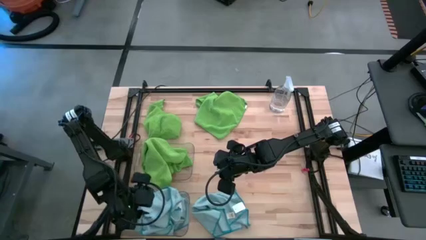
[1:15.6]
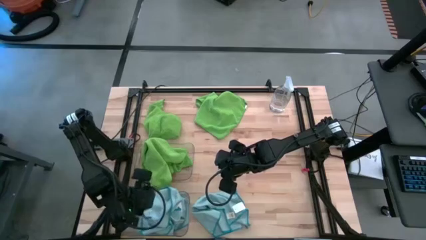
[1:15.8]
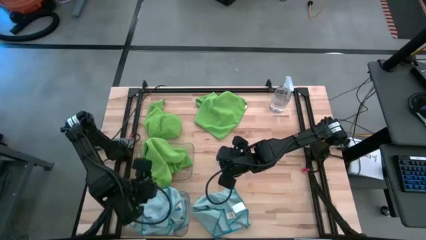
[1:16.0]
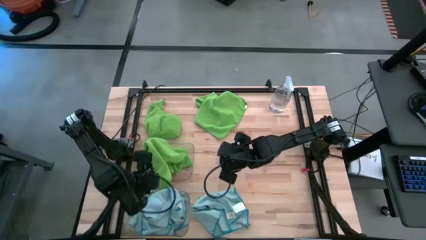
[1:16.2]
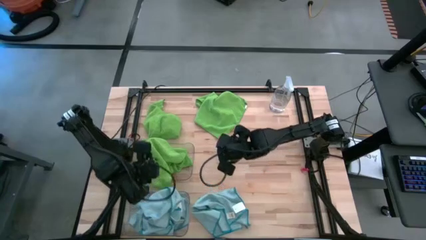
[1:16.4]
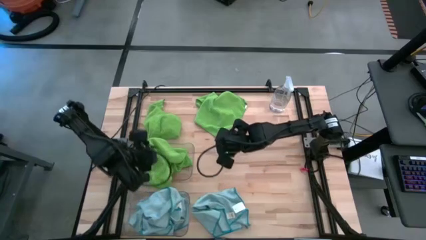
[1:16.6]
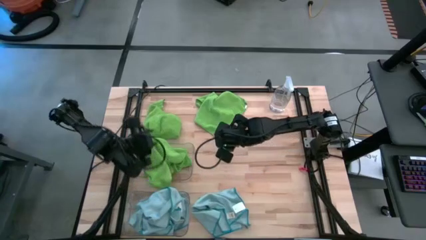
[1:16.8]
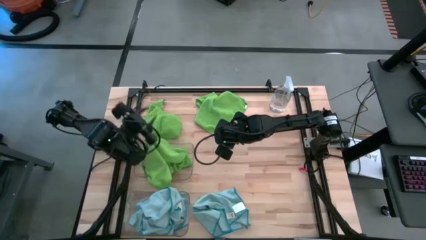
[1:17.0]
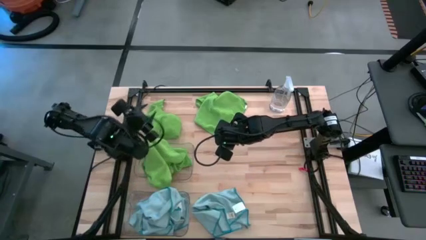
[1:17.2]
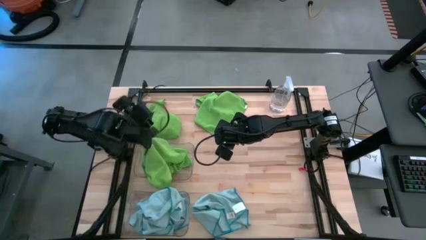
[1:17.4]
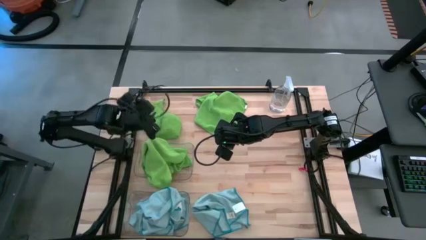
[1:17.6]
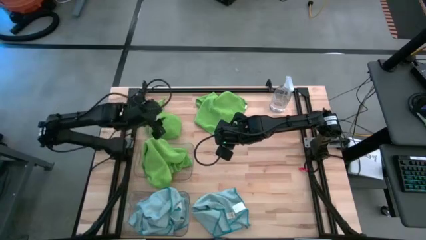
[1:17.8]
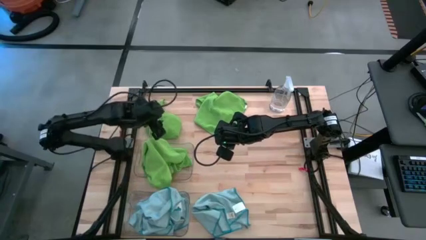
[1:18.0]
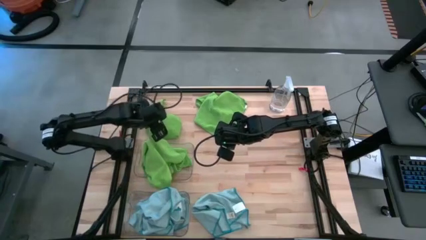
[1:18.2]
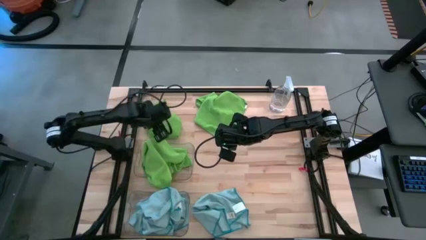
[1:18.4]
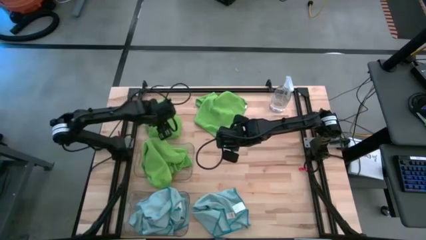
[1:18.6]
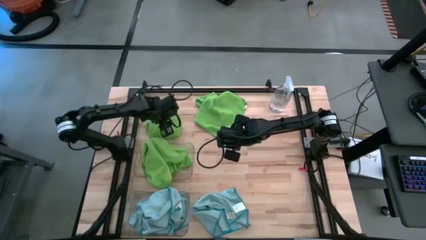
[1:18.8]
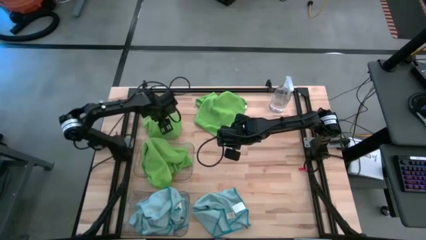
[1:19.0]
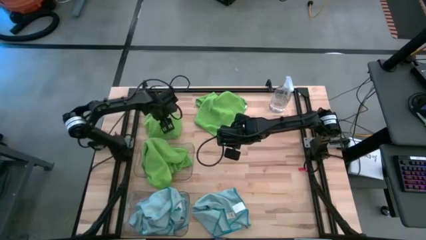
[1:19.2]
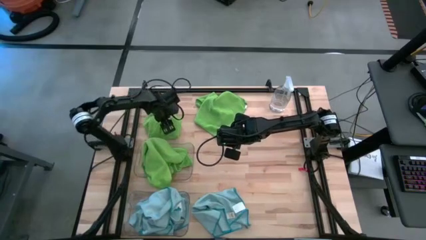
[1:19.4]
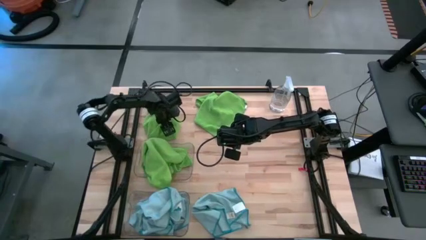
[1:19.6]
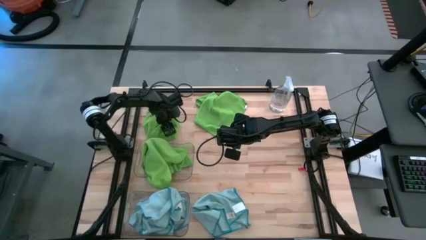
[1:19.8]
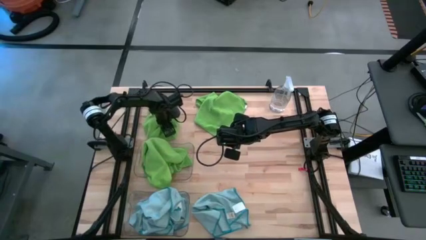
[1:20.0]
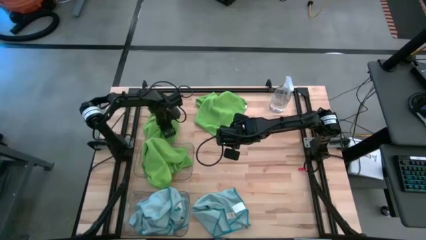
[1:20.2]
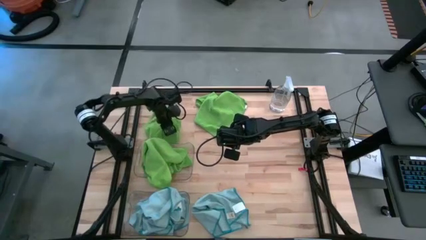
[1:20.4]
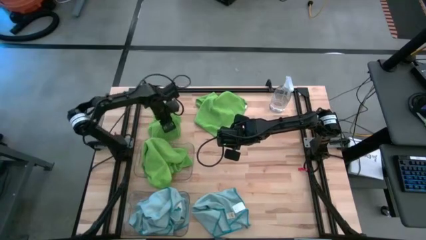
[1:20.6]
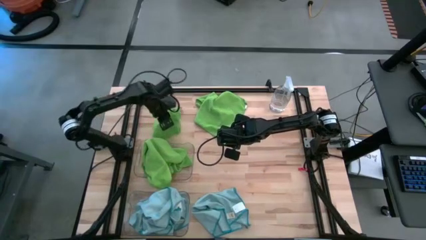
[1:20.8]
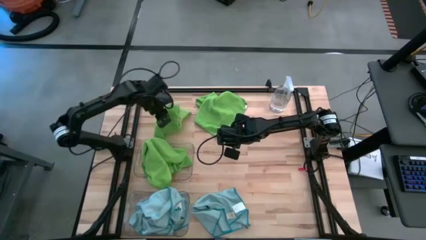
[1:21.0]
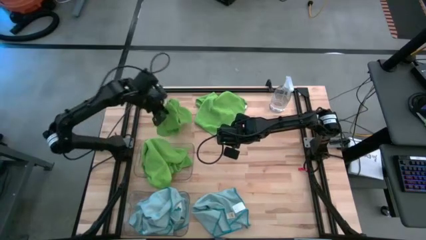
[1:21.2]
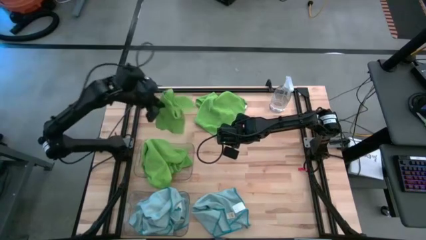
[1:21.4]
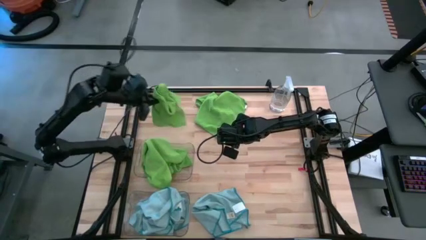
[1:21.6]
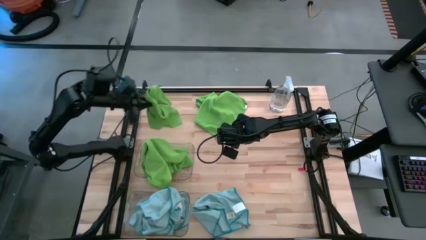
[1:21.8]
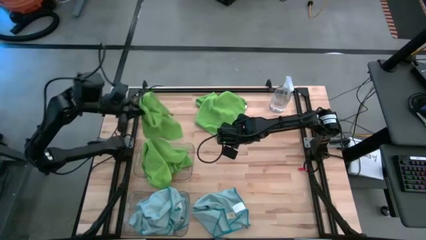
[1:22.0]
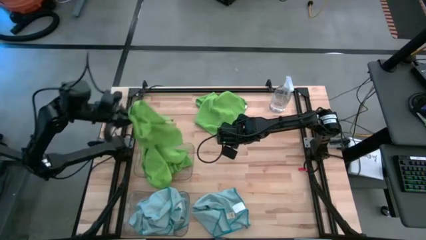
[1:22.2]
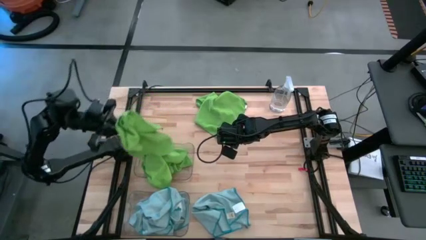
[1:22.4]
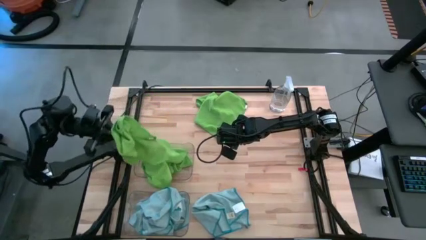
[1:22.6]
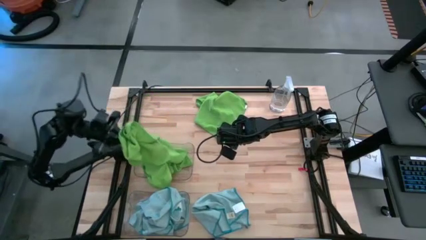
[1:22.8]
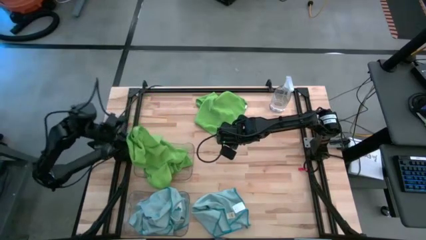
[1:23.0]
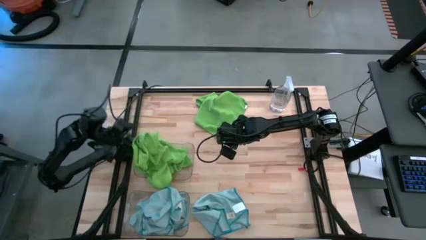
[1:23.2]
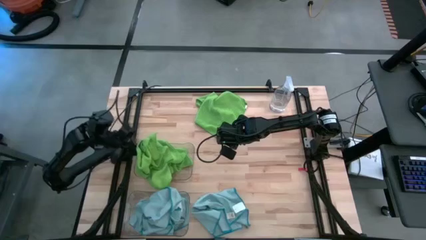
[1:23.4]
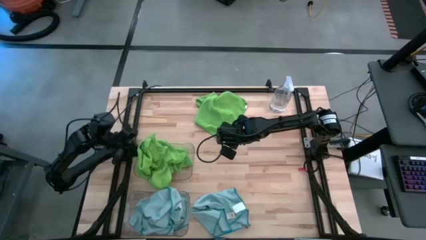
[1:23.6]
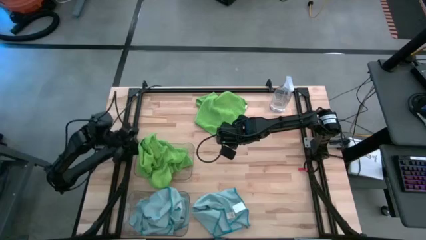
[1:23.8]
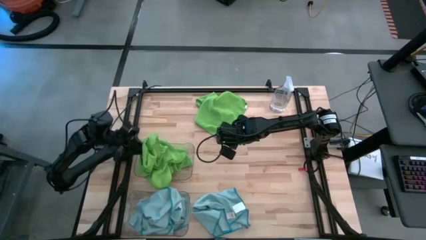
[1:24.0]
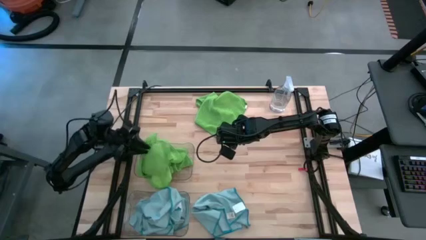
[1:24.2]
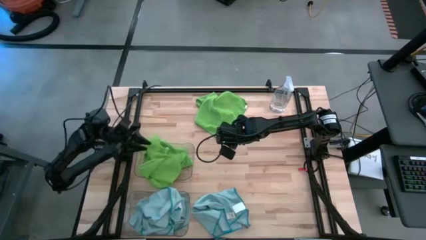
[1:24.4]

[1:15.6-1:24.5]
Task: Sort microfiber towel by color & place in baskets
Put the left green microfiber cloth into the top transparent bin

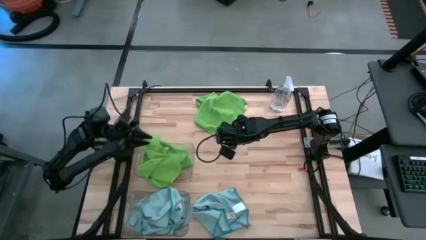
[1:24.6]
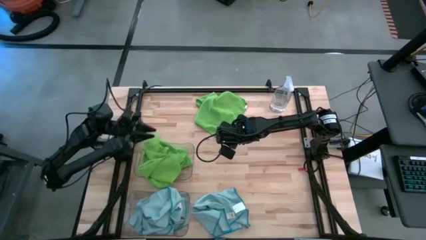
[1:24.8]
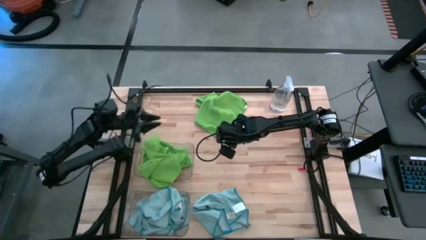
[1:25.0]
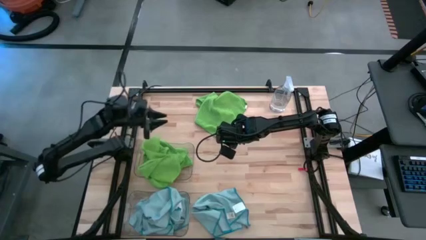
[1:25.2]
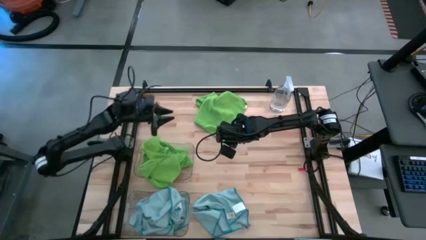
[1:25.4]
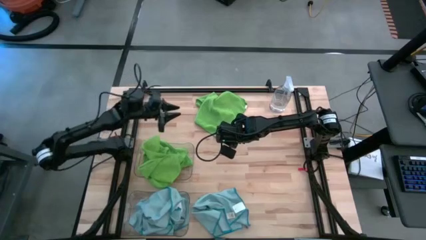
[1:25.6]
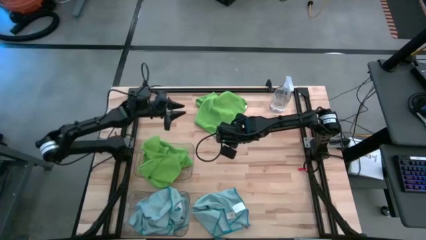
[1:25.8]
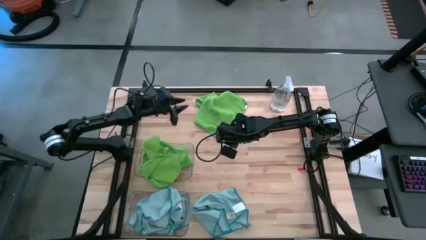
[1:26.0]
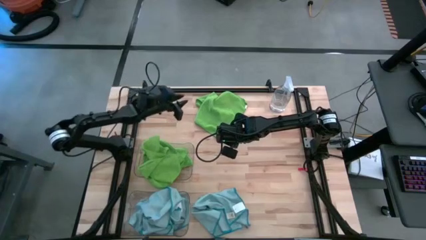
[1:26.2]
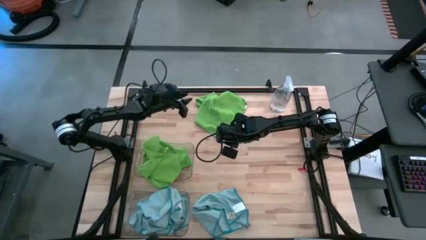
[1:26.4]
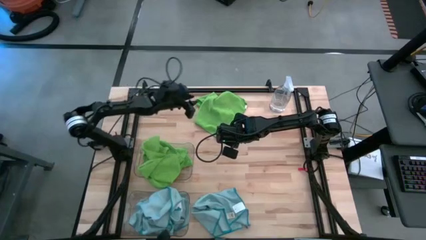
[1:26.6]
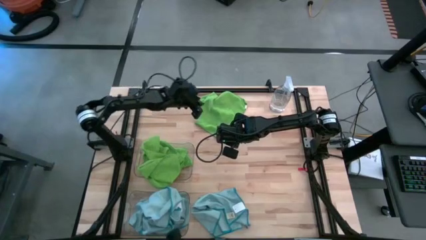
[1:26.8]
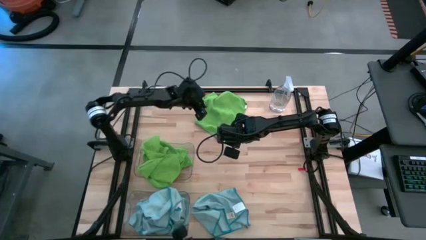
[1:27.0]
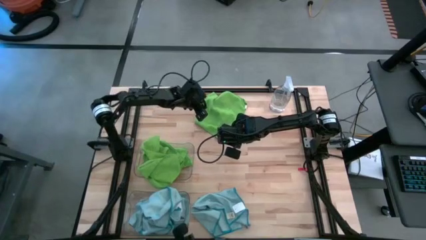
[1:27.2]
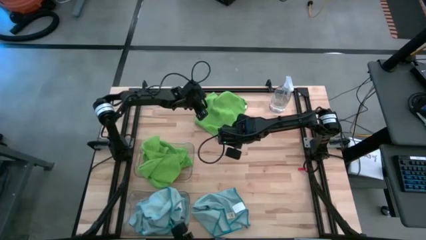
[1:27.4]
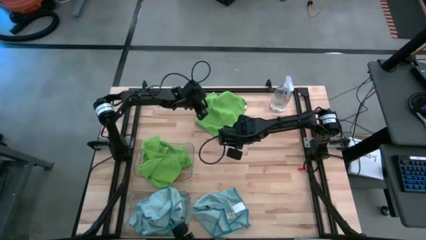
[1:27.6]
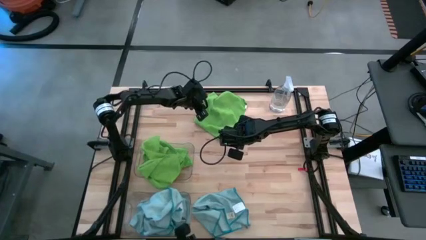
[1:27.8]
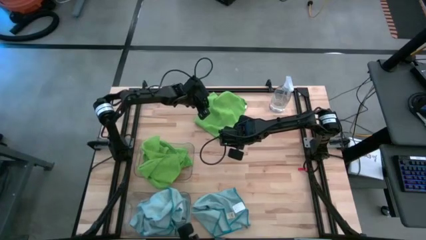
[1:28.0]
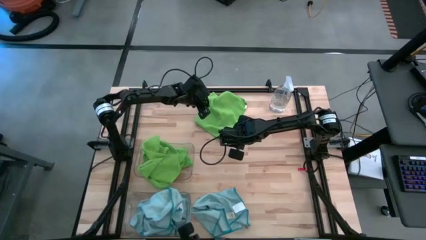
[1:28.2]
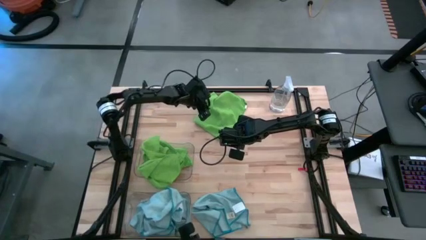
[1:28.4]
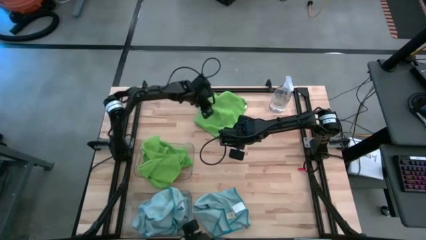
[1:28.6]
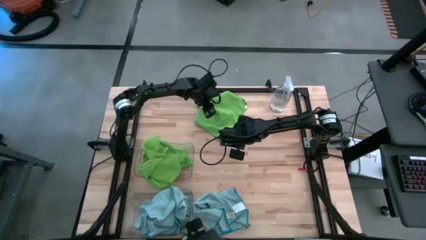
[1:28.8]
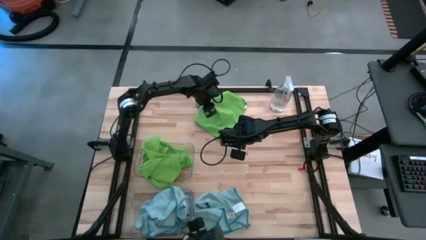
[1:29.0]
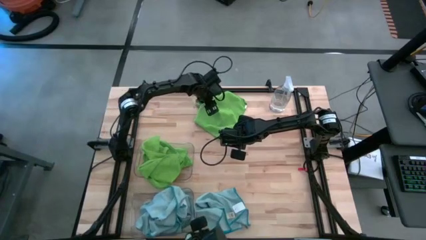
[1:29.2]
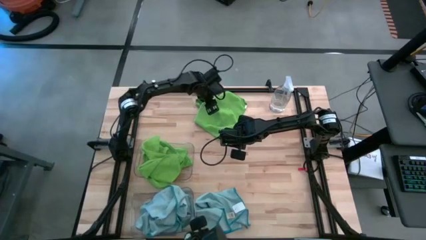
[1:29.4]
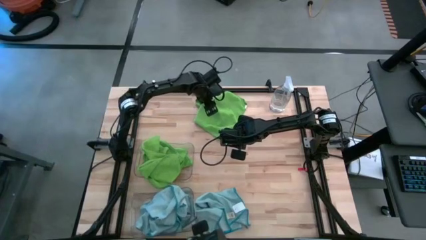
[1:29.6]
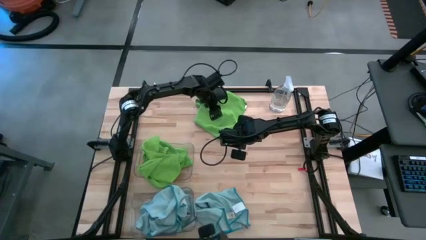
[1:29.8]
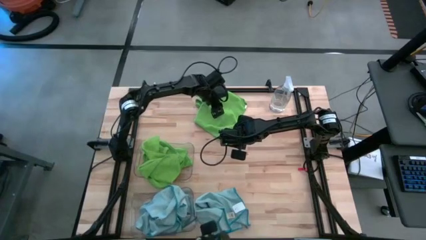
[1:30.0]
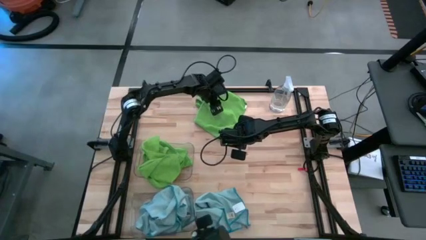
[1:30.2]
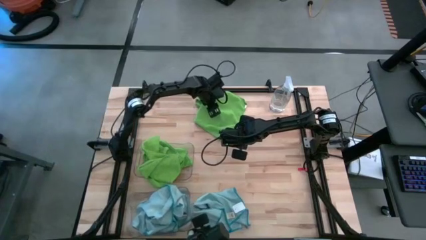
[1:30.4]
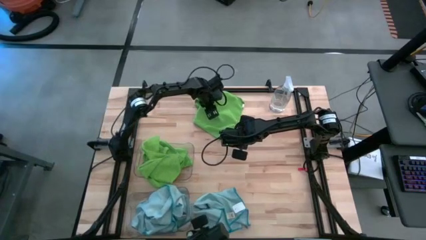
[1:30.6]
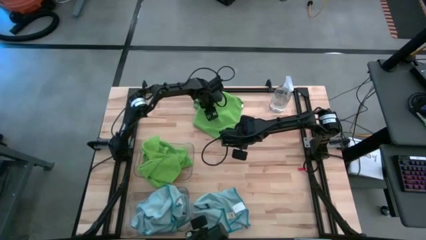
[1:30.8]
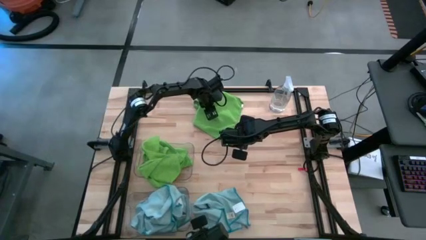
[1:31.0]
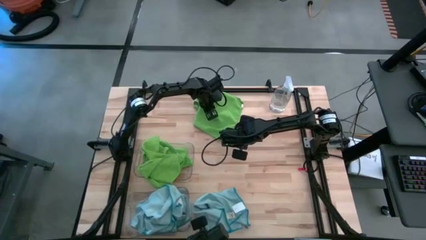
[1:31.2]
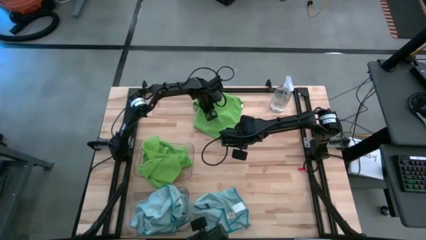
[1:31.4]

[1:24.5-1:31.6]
Put the green microfiber cloth into the top transparent bin

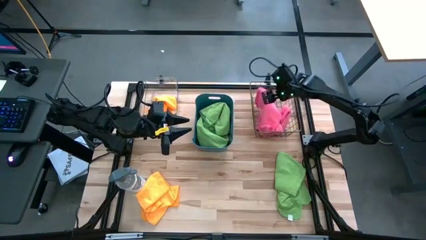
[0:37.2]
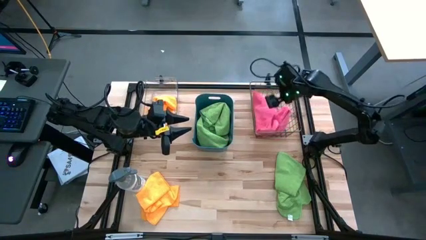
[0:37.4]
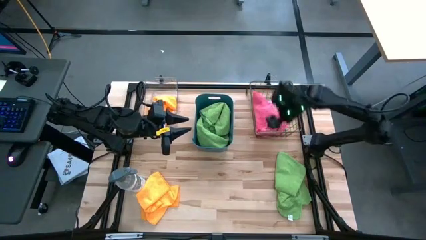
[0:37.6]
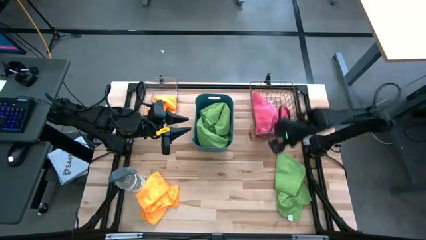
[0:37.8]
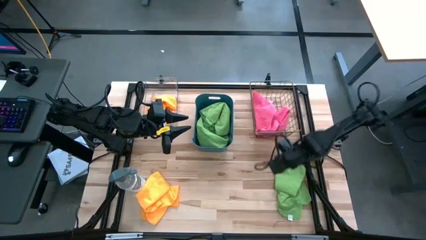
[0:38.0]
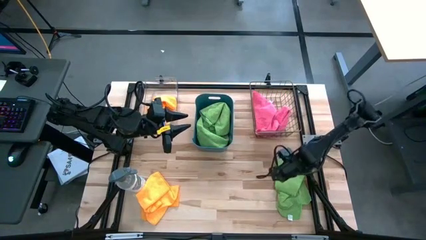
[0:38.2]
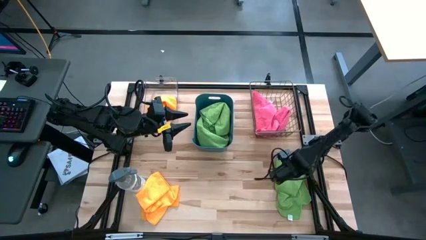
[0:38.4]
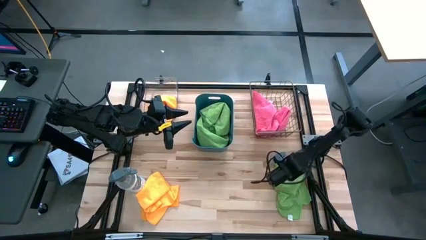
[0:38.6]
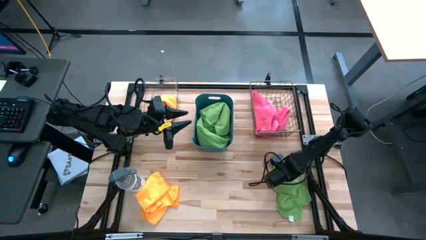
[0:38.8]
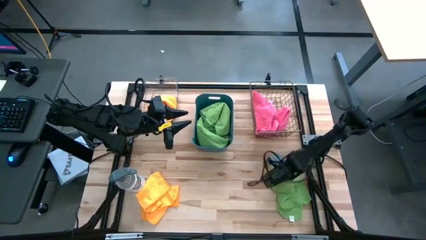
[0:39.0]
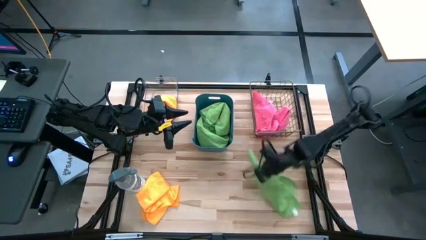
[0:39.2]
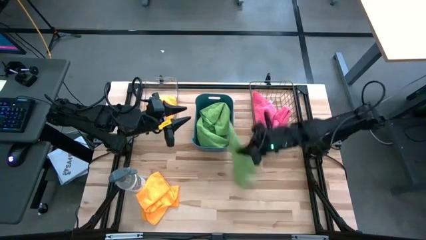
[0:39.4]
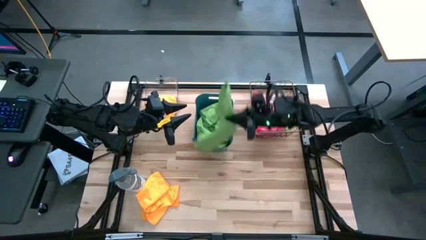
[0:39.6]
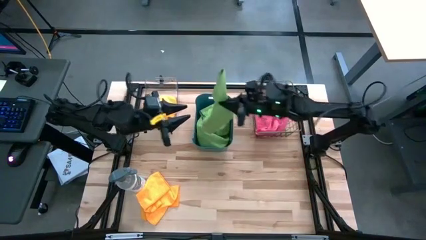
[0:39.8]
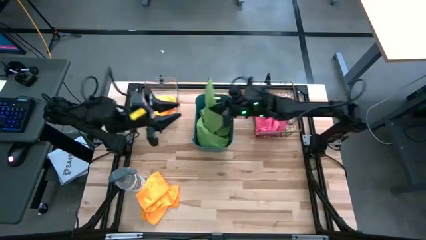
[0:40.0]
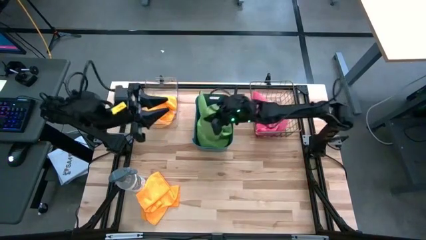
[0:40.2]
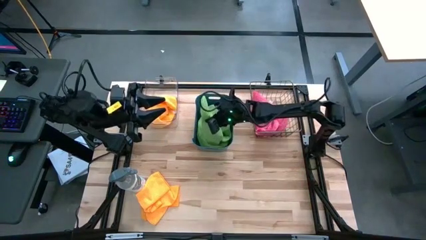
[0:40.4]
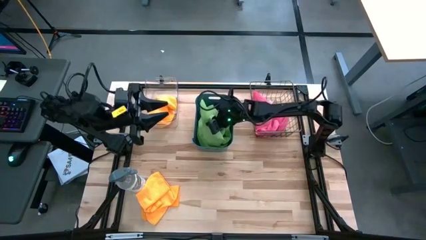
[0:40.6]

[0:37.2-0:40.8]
Task: Sort microfiber towel by color & place in baskets
Put the green microfiber cloth into the blue bin
